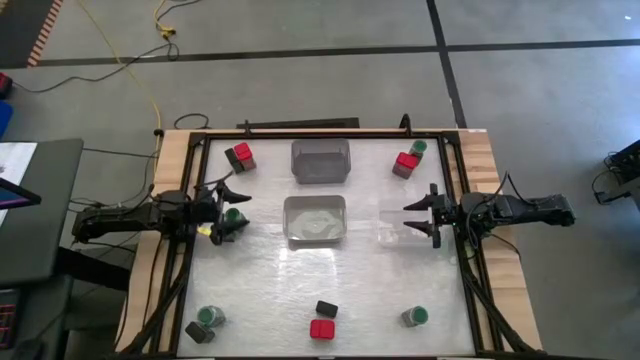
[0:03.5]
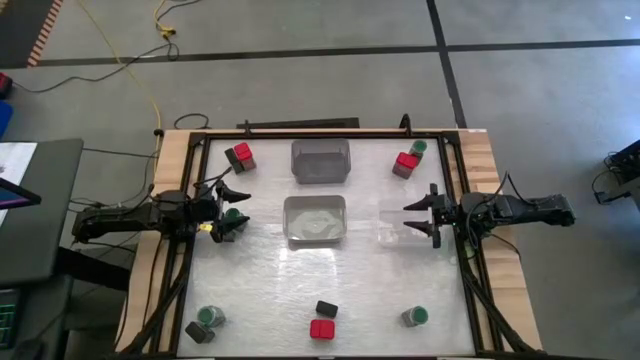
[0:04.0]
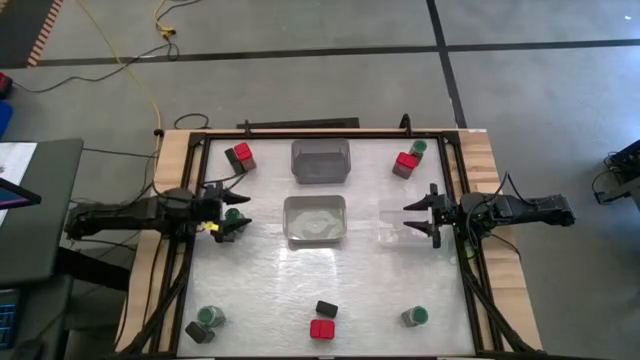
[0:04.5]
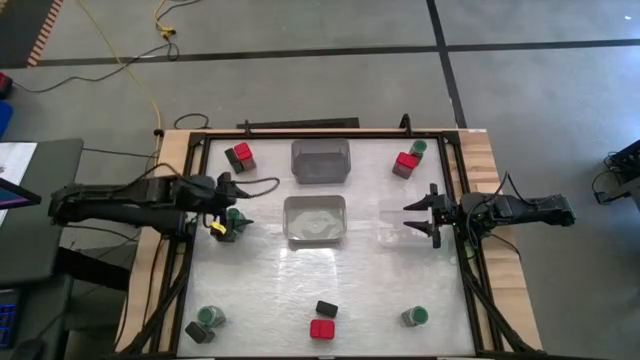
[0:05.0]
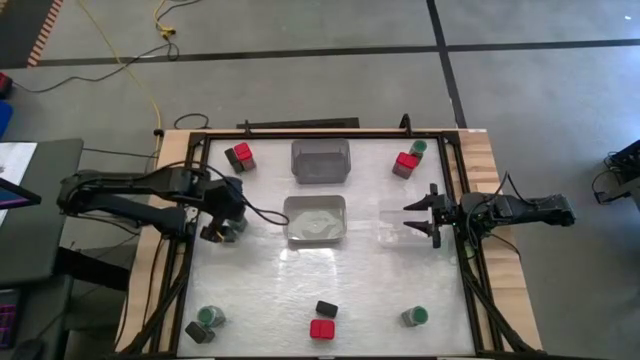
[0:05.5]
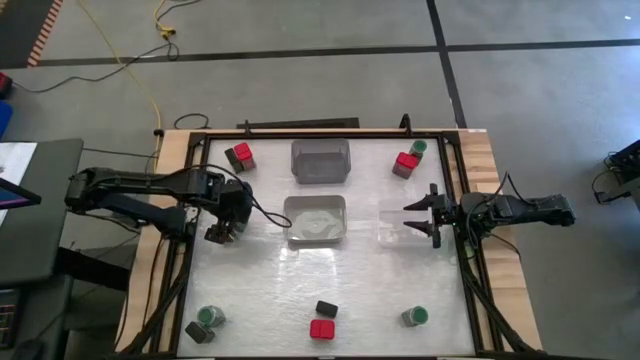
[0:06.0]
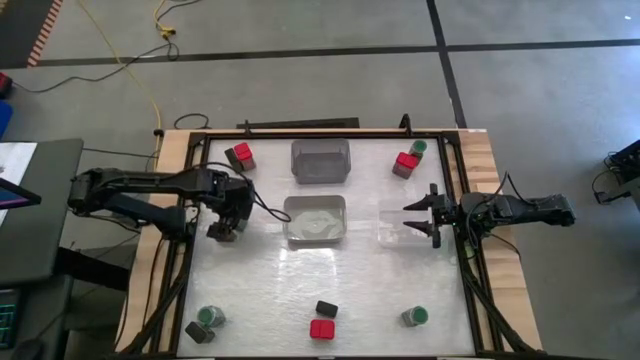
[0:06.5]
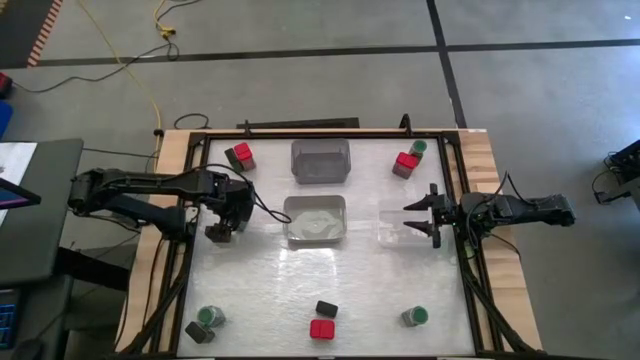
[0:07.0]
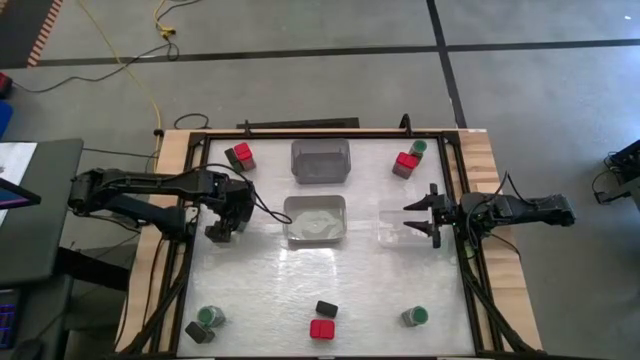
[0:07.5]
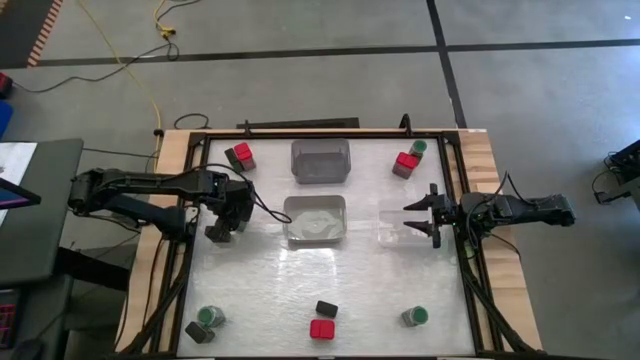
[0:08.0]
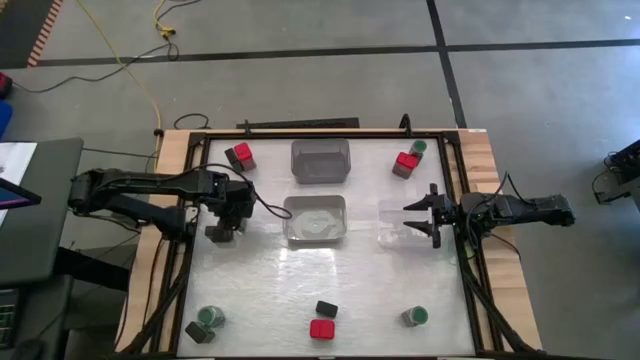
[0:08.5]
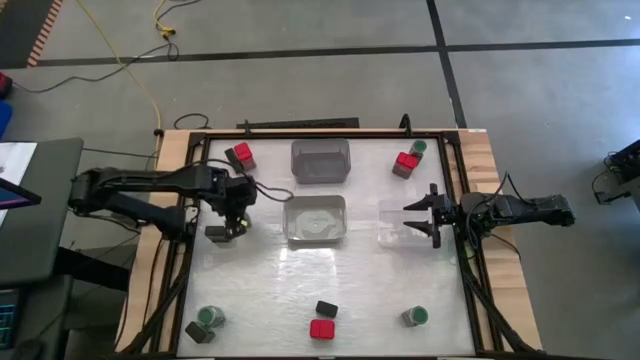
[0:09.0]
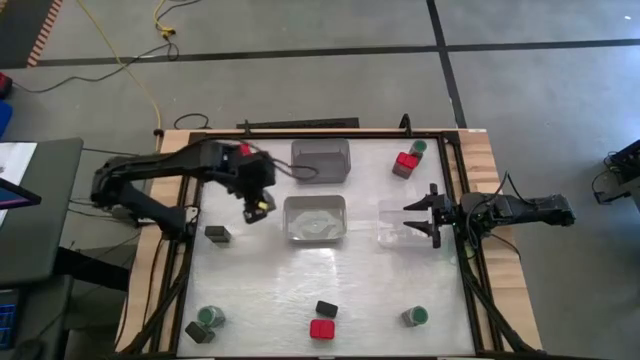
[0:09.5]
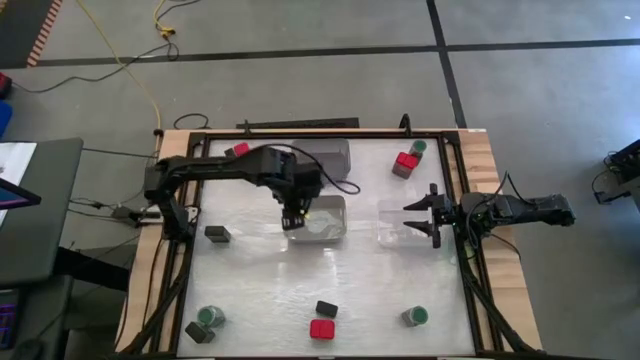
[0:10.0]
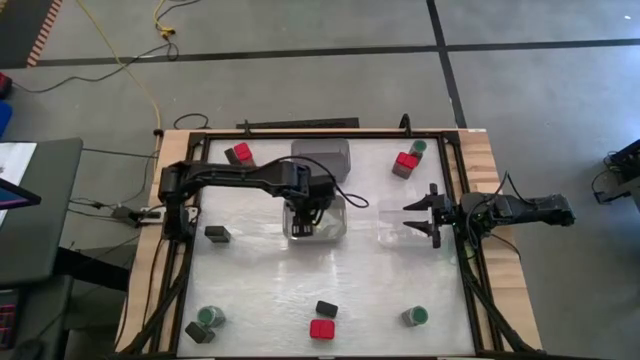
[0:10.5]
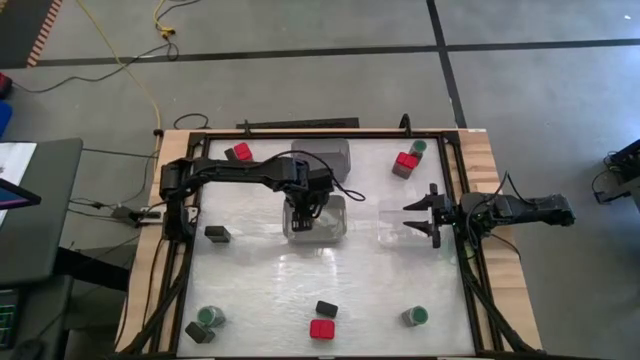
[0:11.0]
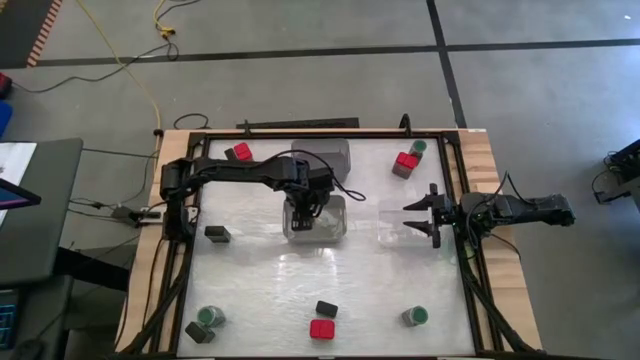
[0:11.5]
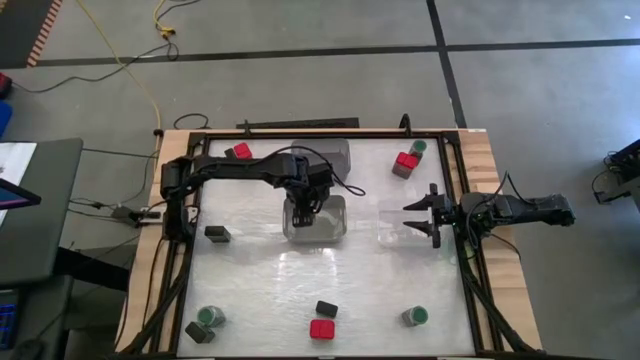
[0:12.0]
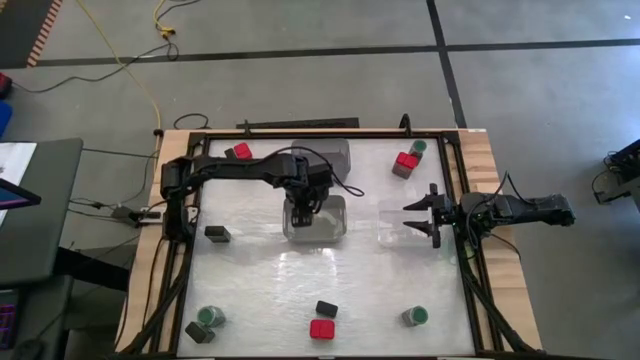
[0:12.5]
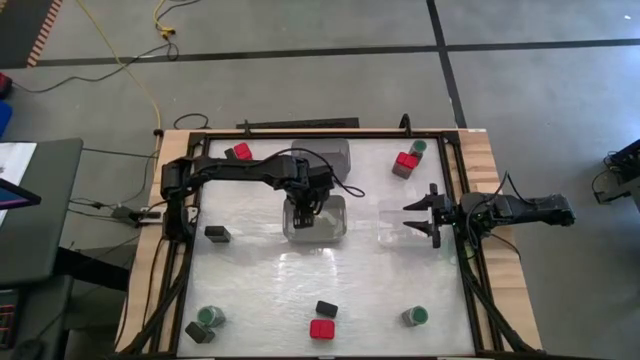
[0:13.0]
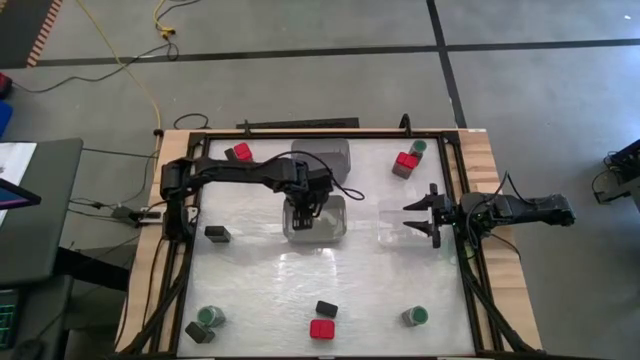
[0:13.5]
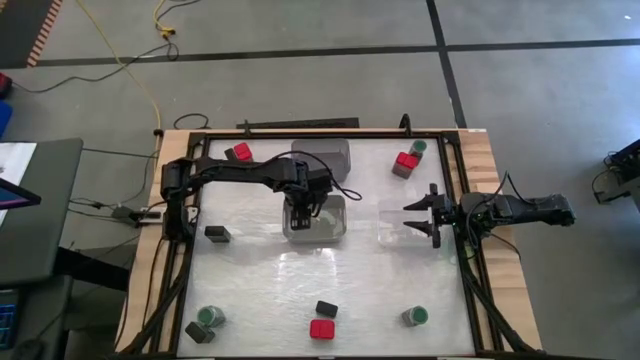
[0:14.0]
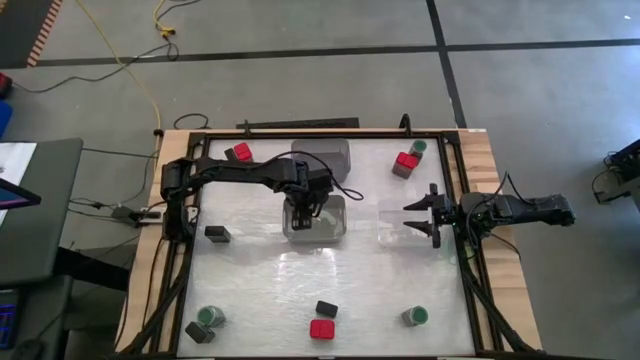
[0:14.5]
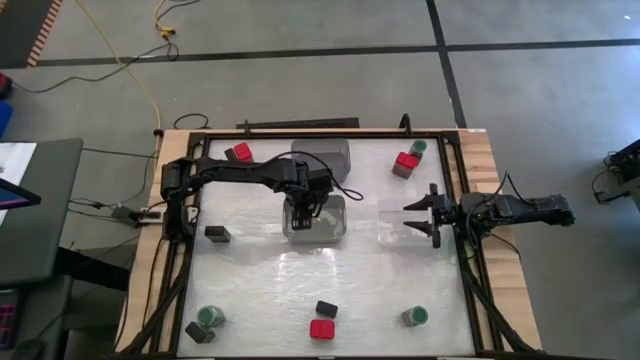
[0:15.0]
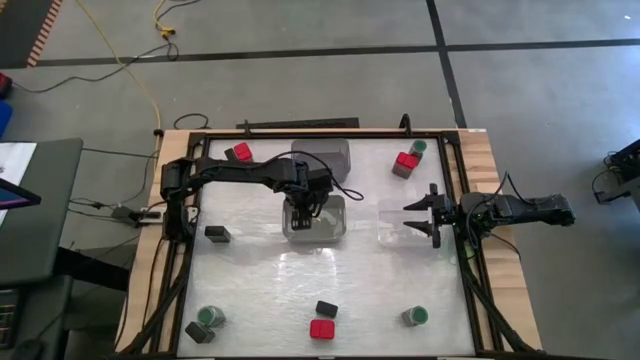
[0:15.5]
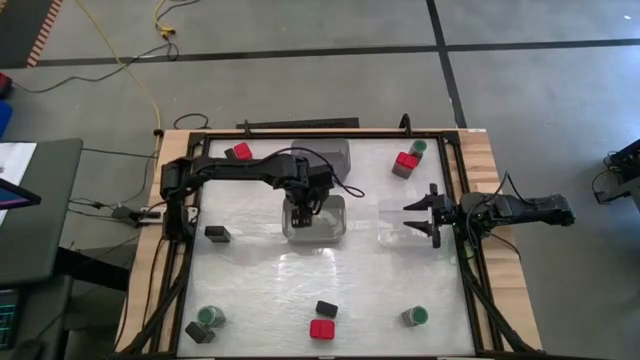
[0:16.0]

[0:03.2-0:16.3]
Task: Sort spices by type
Put the green spice bottle into the gray bin
